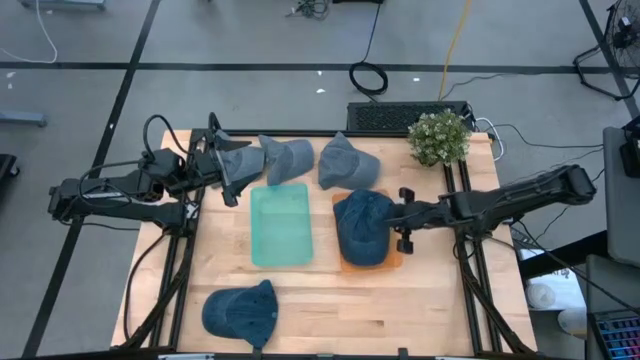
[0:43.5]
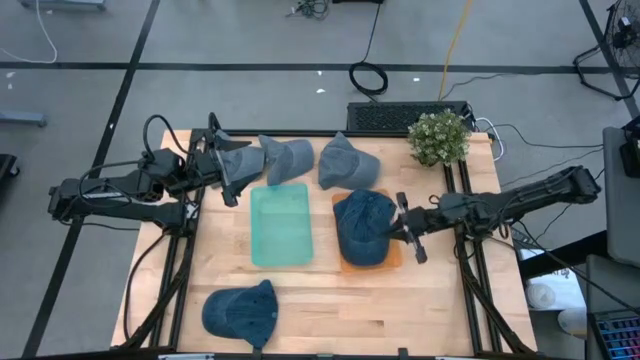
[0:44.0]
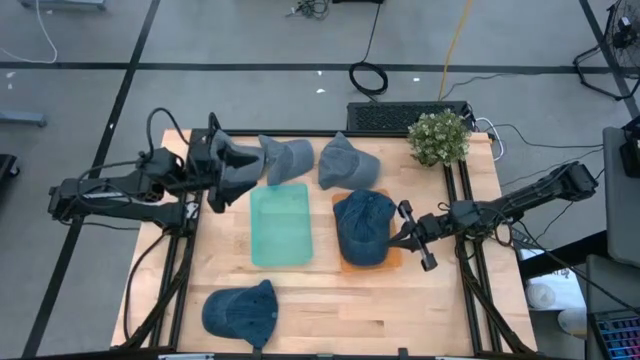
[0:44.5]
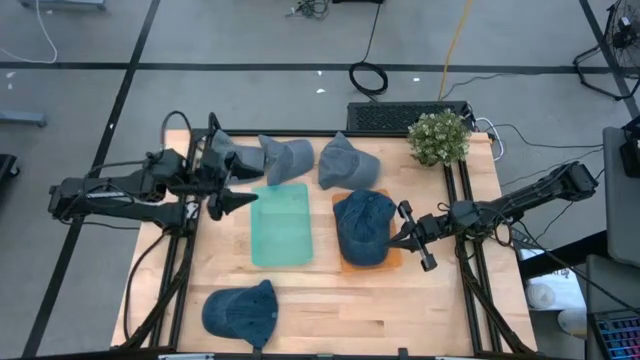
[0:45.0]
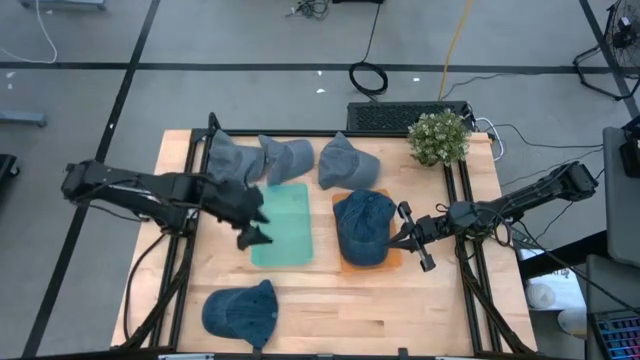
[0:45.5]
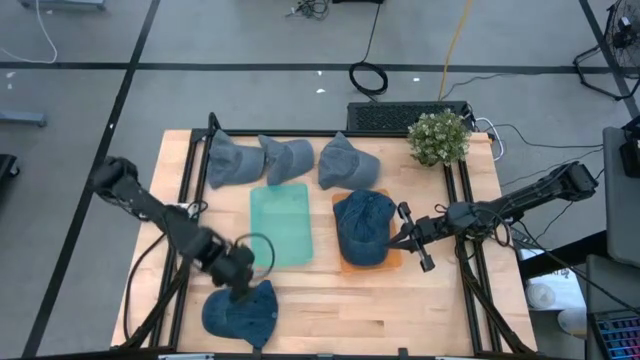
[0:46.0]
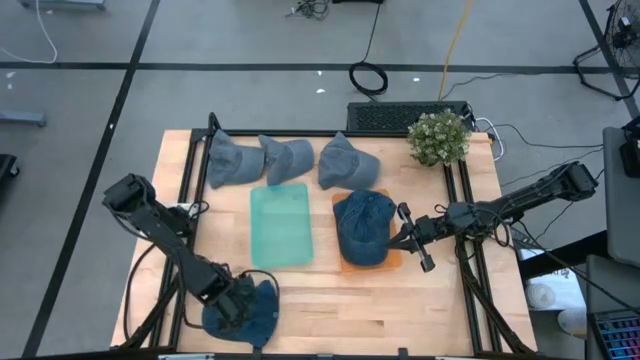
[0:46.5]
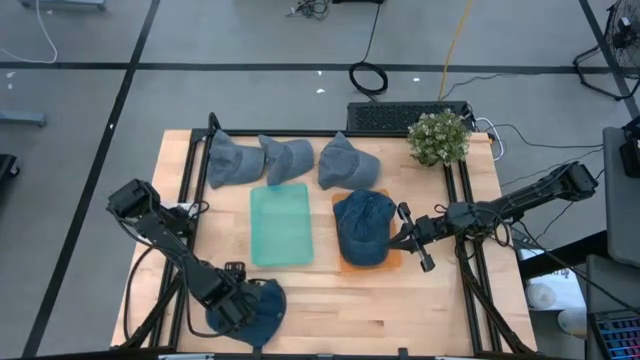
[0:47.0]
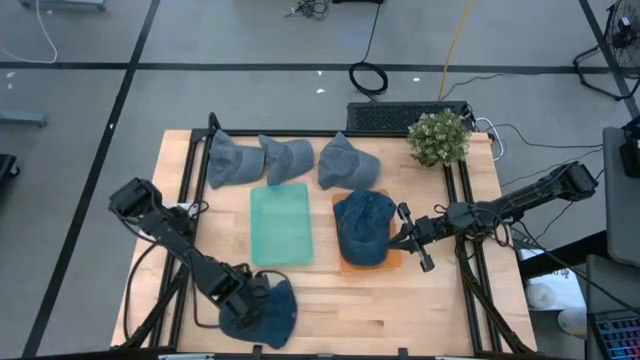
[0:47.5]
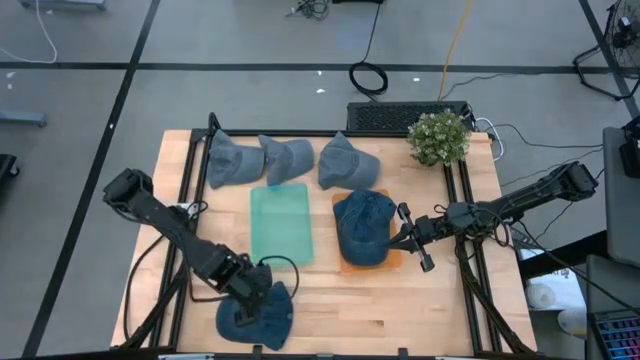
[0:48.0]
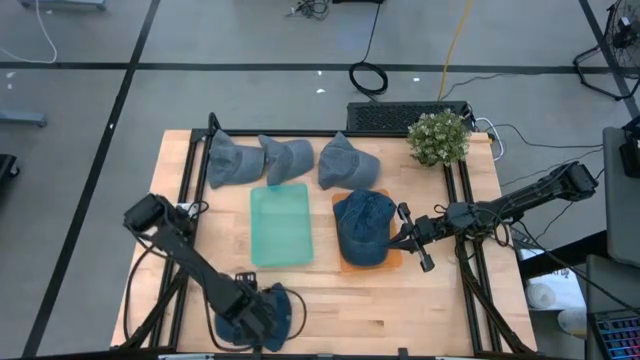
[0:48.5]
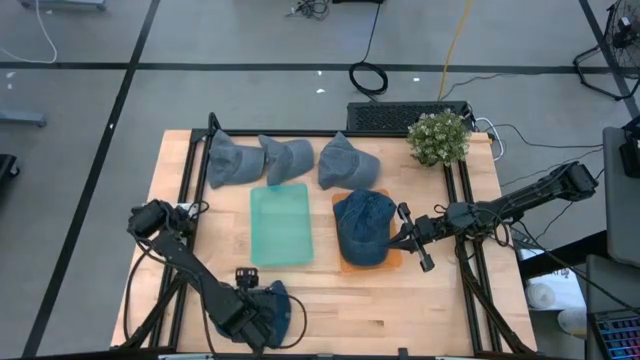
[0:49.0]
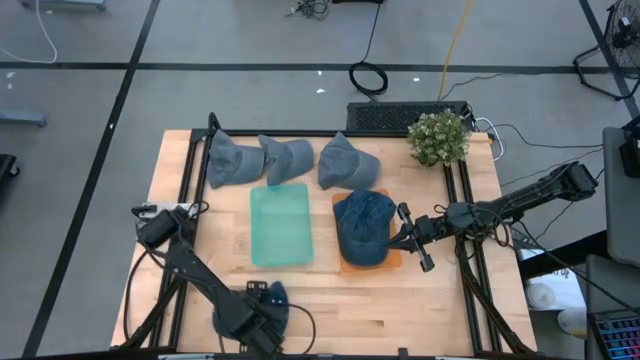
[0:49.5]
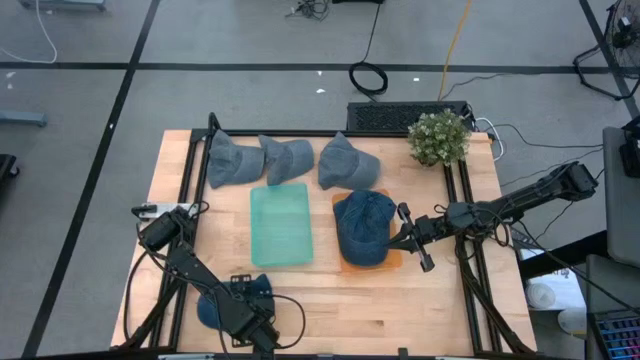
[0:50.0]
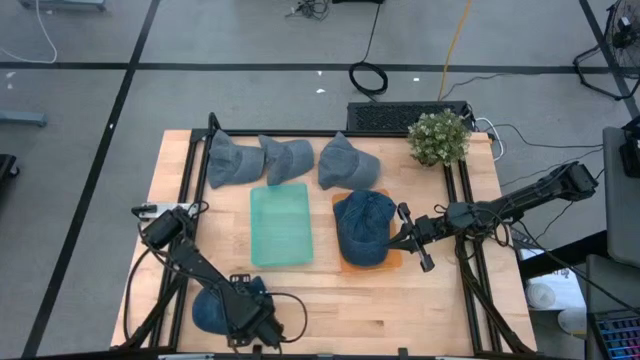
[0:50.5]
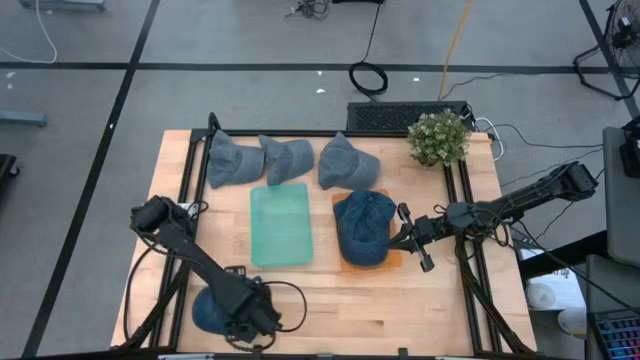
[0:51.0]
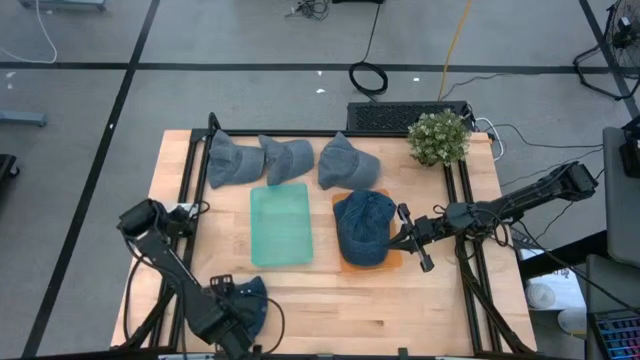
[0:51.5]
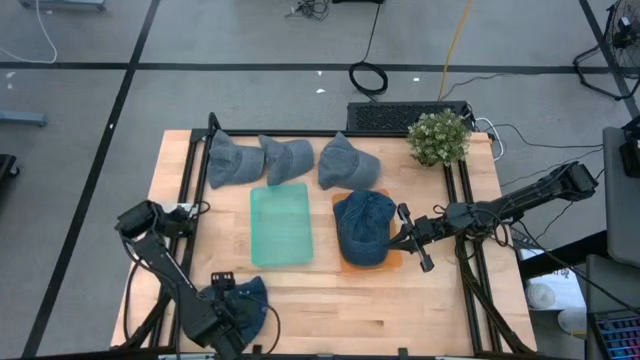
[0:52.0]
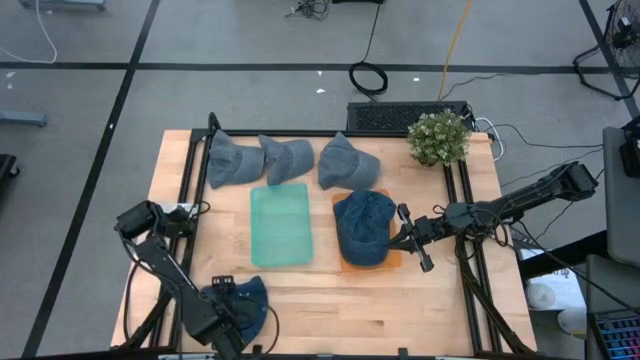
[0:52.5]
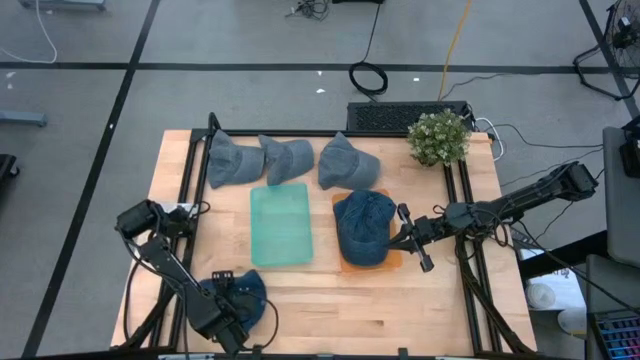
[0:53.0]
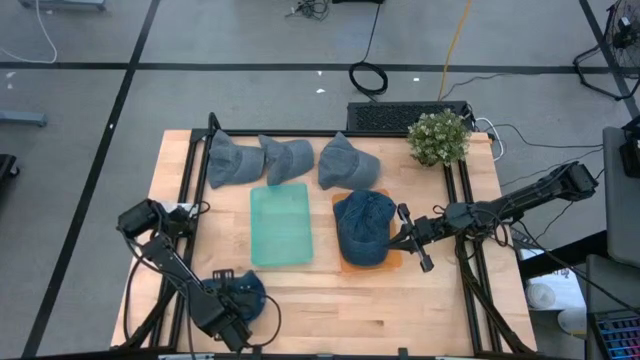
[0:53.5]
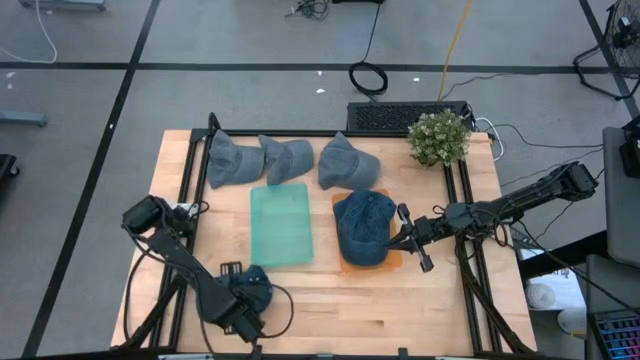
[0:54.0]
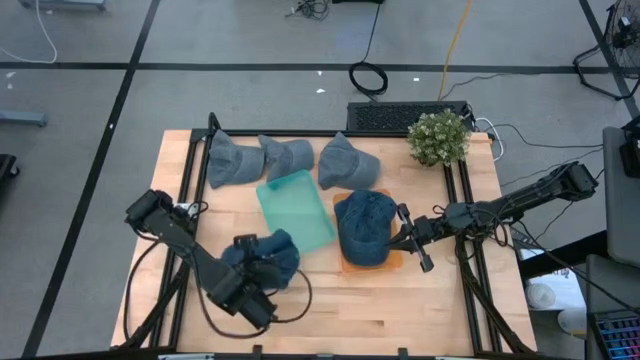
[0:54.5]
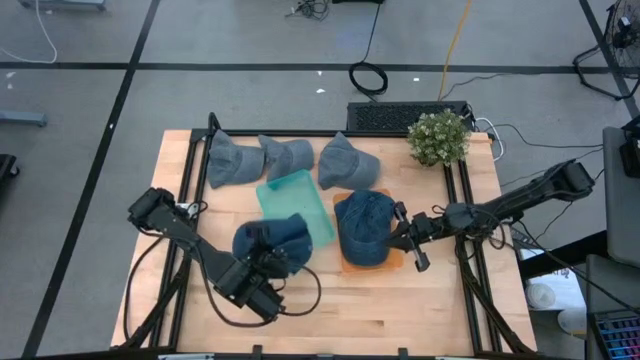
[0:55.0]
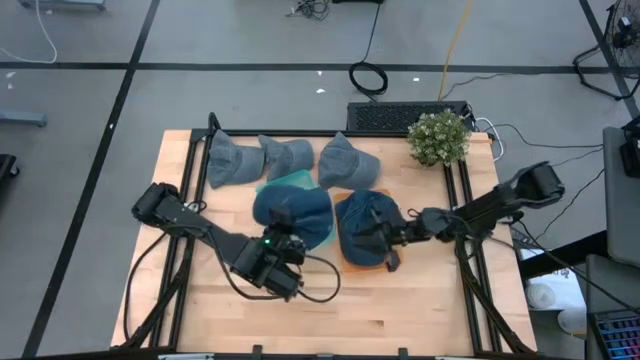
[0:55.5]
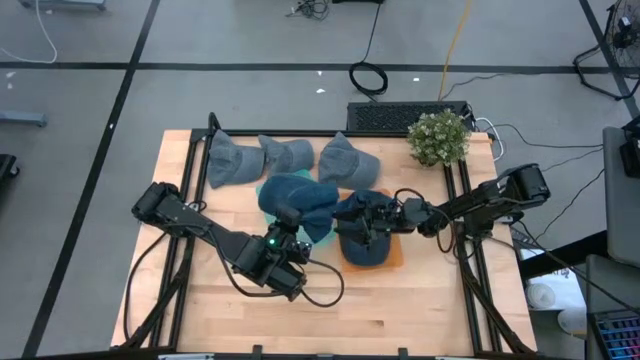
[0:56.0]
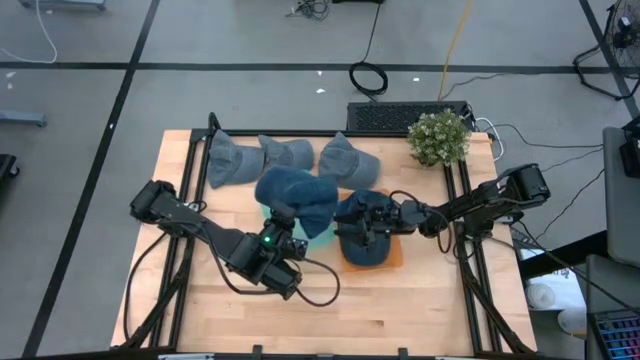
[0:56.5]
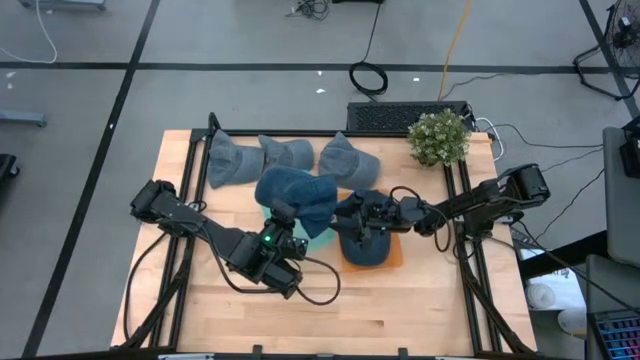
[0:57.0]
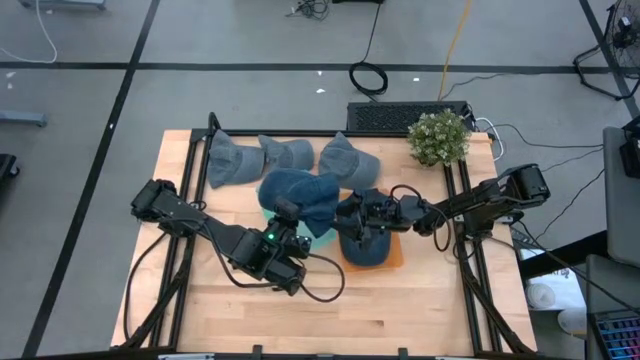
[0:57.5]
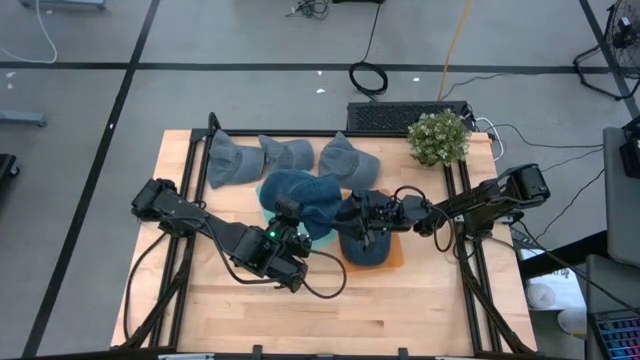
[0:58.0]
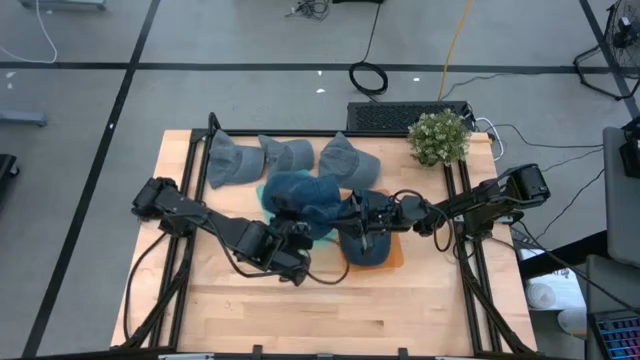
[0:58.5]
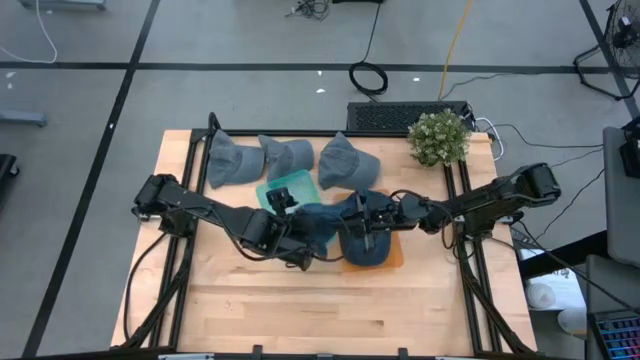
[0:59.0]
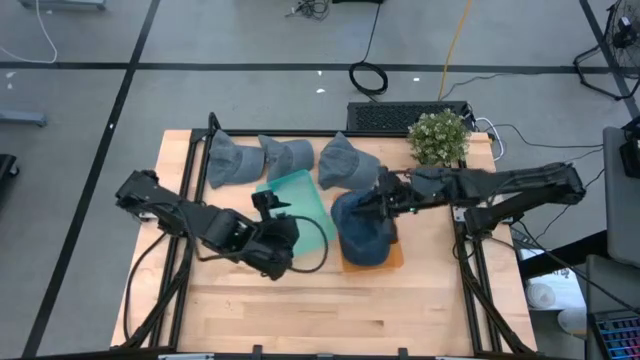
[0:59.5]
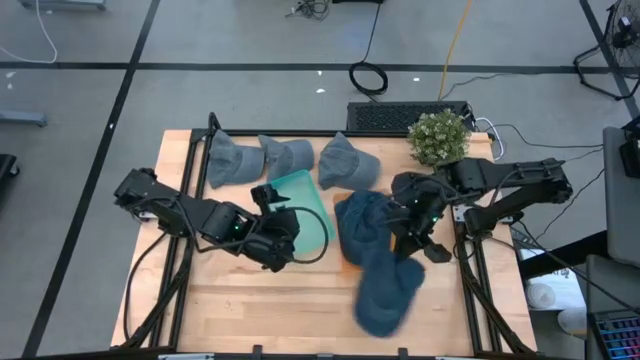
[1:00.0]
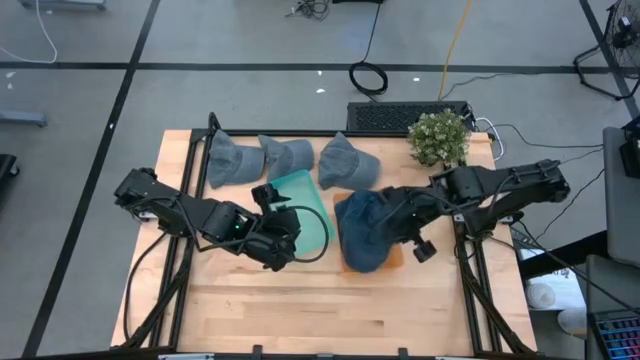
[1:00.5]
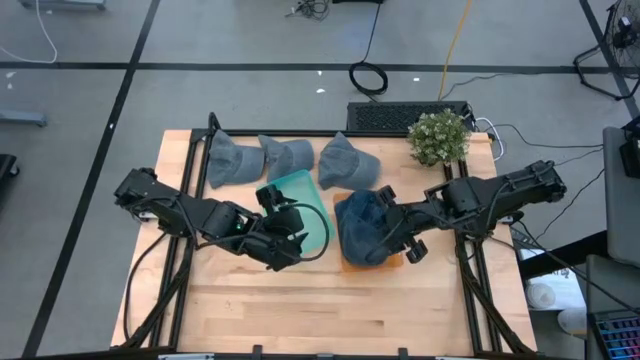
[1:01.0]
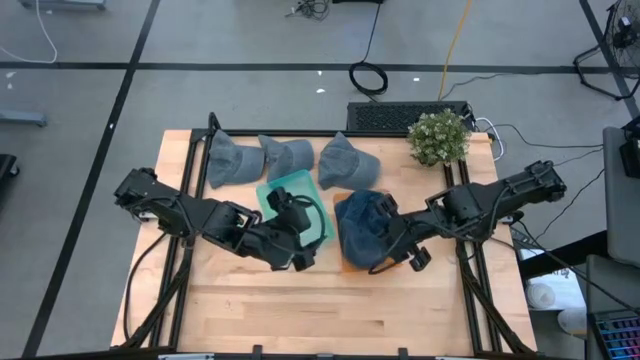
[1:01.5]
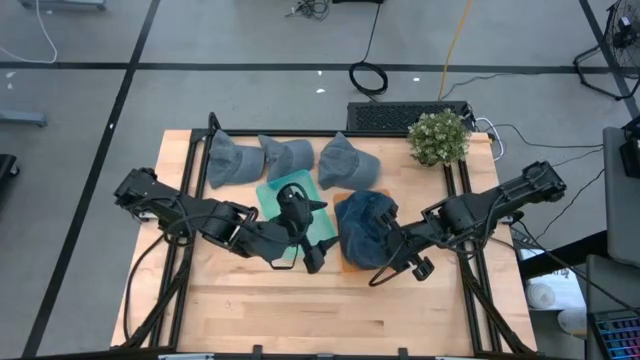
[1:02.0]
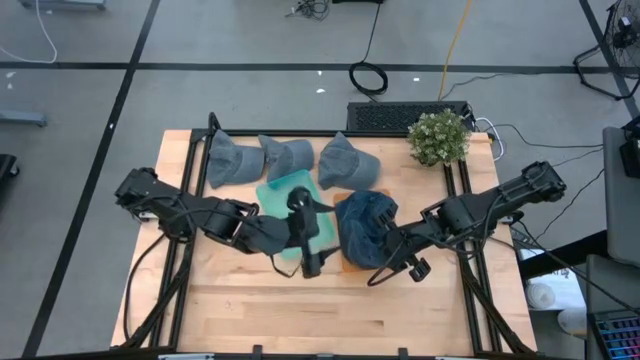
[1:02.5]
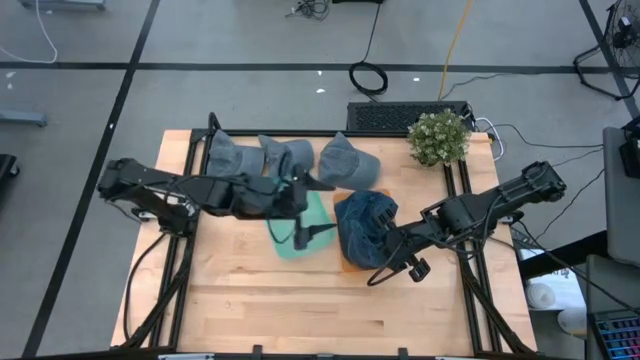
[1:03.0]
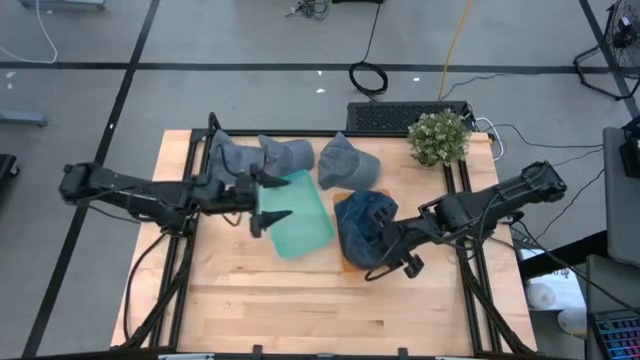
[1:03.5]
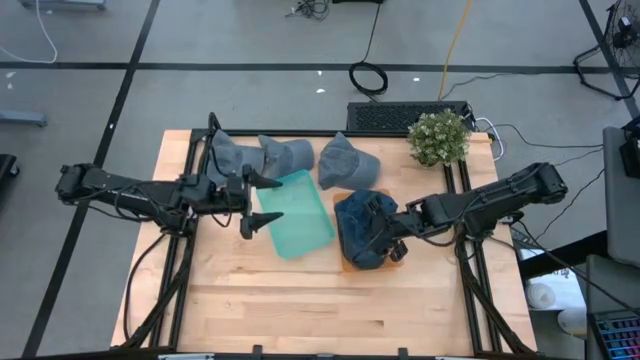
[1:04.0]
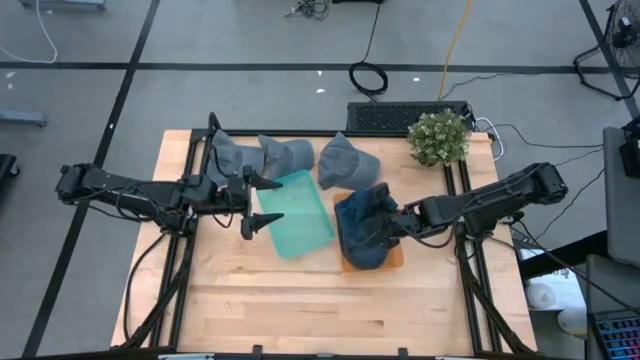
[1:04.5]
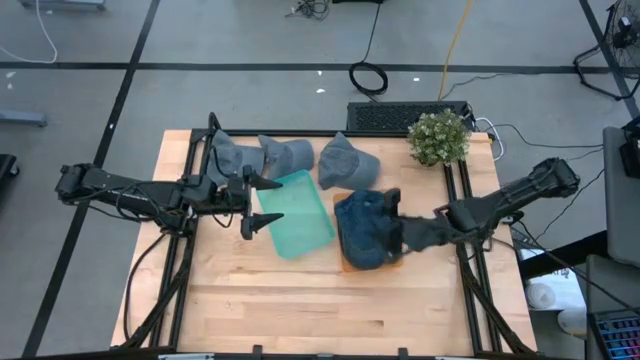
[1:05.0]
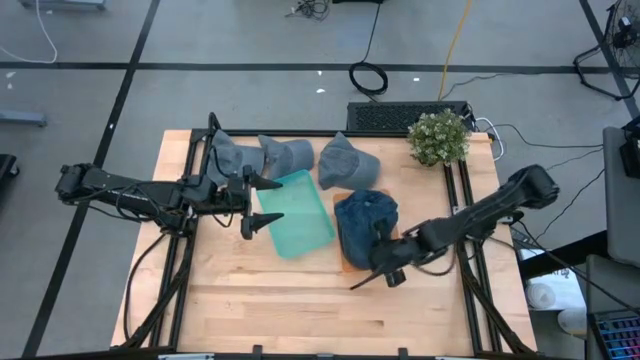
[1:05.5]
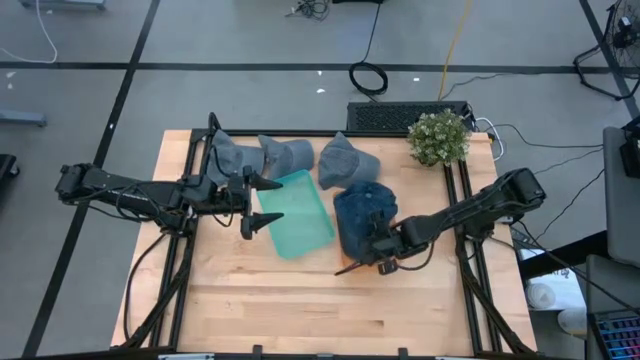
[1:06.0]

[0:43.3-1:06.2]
Task: Pick & Place hat
Put the blue cap into the orange bin
